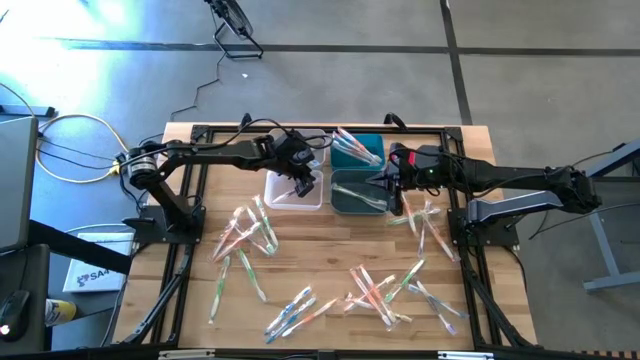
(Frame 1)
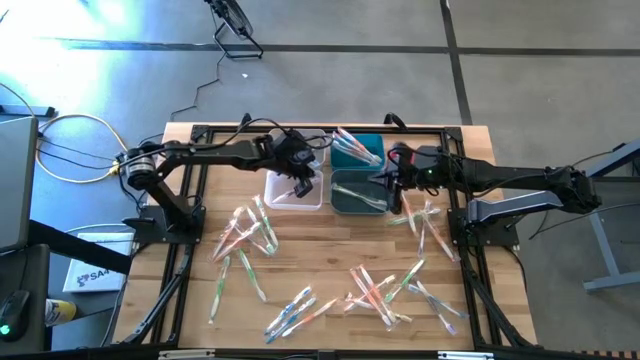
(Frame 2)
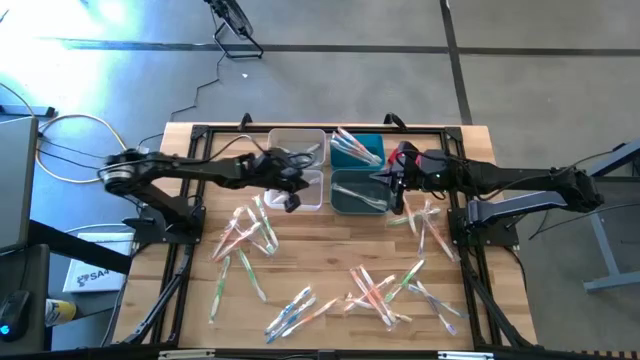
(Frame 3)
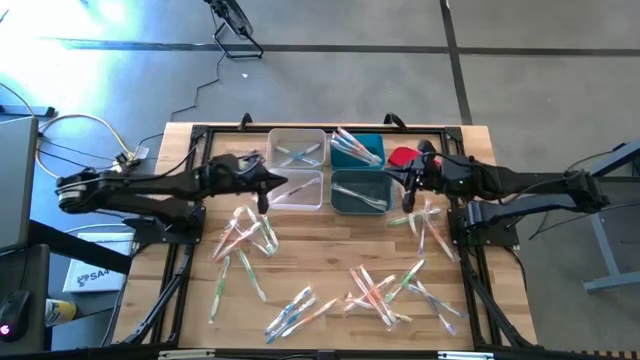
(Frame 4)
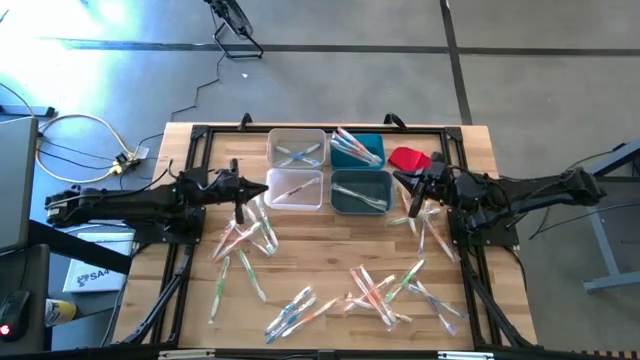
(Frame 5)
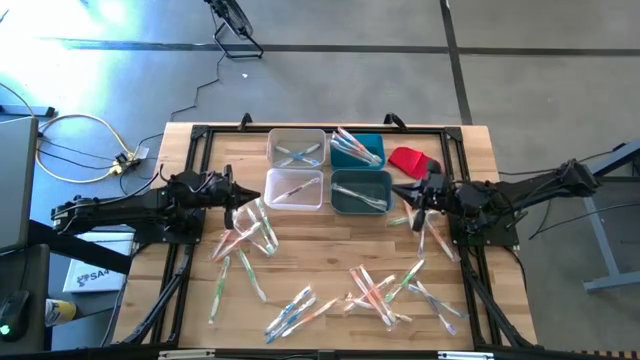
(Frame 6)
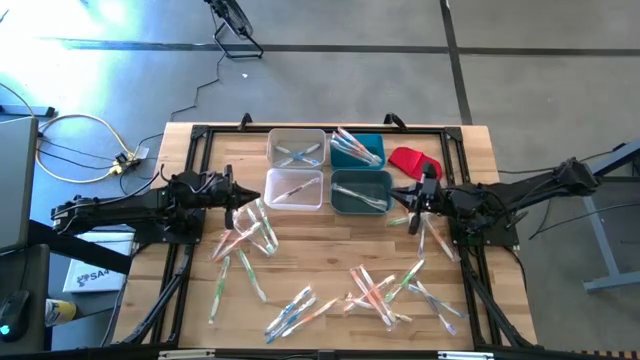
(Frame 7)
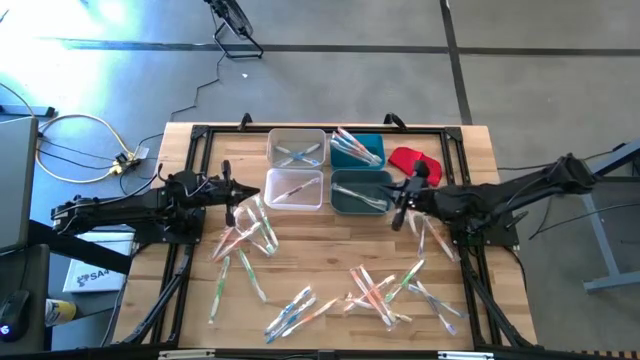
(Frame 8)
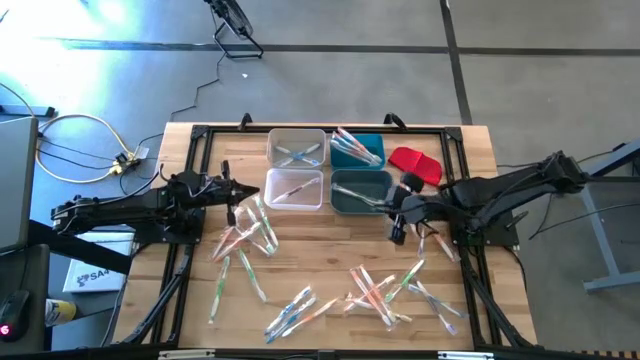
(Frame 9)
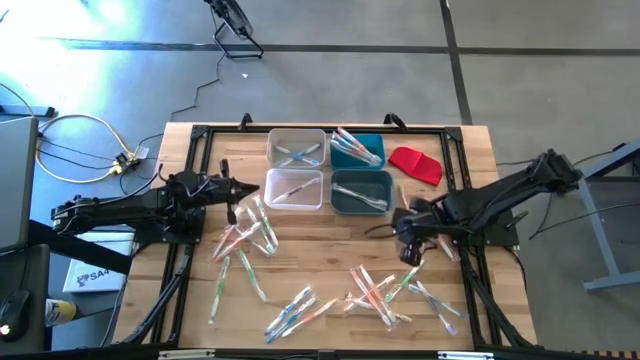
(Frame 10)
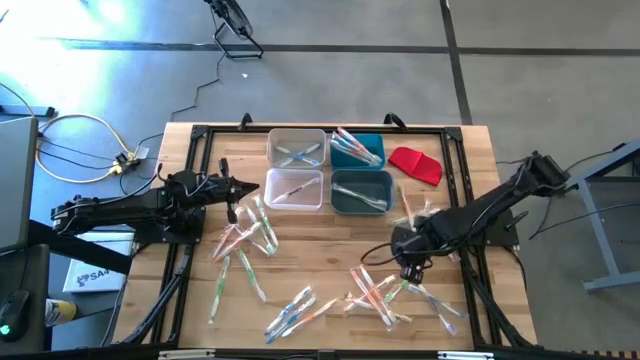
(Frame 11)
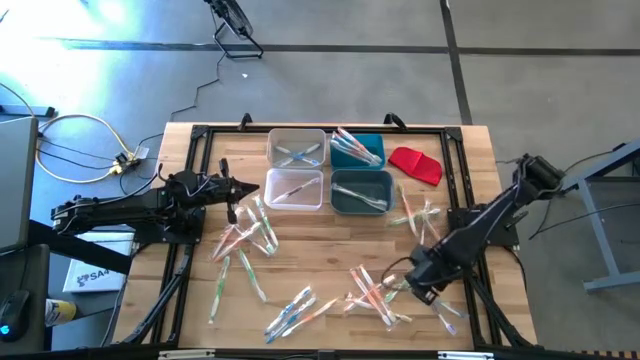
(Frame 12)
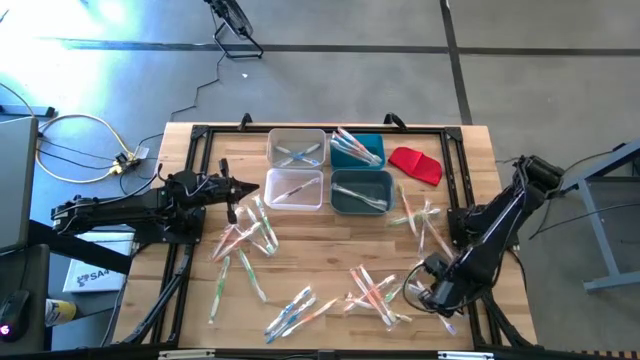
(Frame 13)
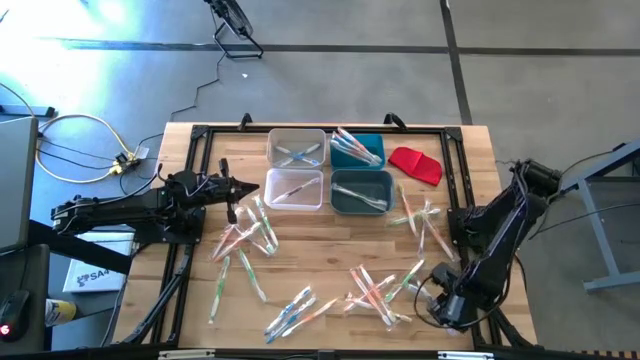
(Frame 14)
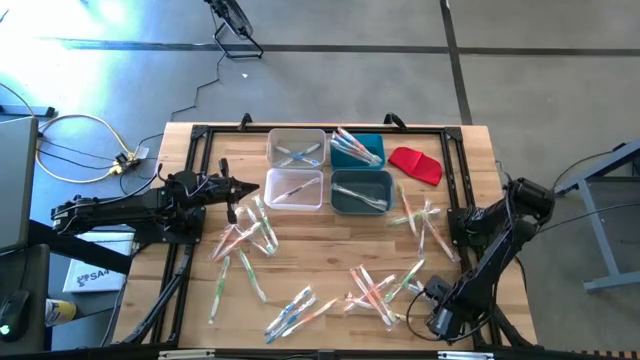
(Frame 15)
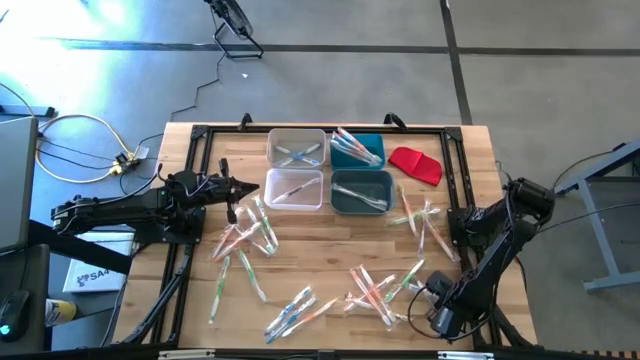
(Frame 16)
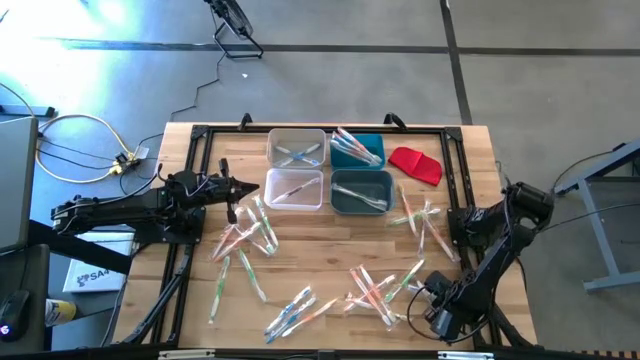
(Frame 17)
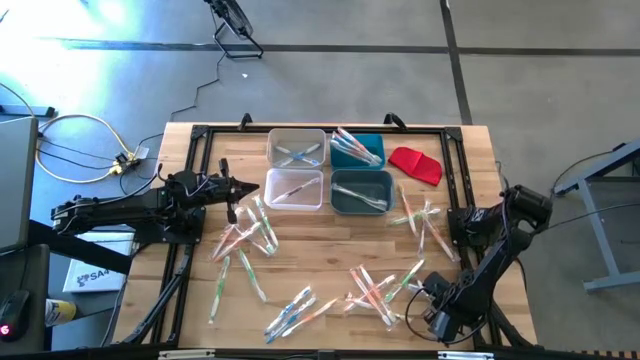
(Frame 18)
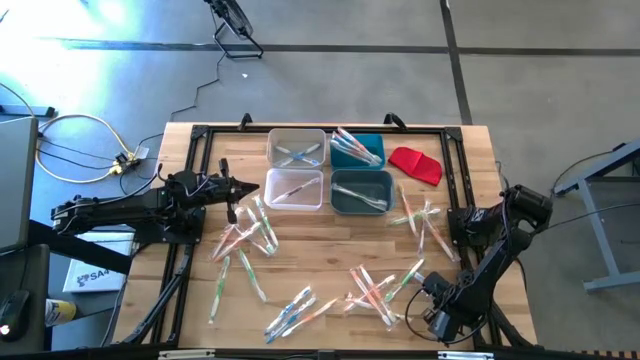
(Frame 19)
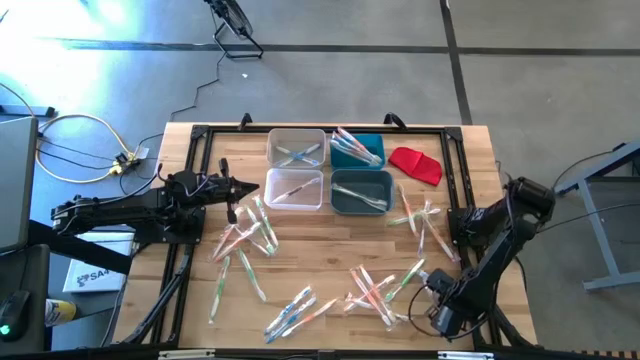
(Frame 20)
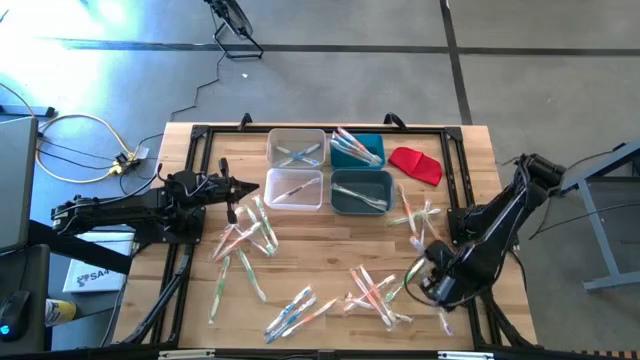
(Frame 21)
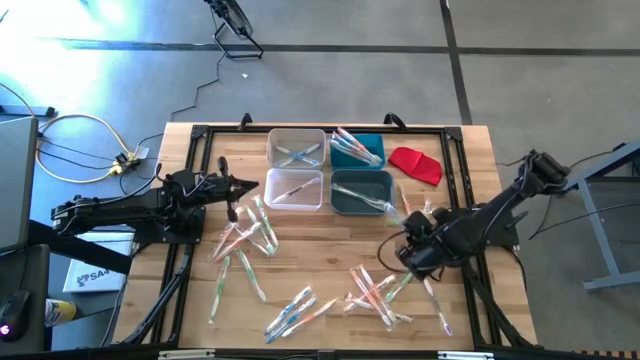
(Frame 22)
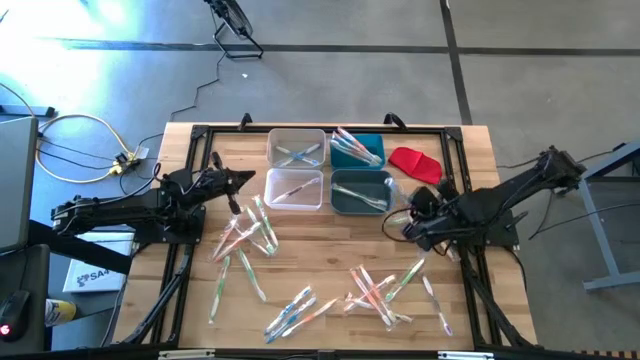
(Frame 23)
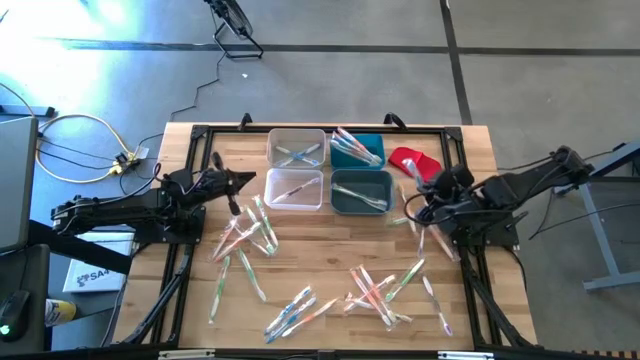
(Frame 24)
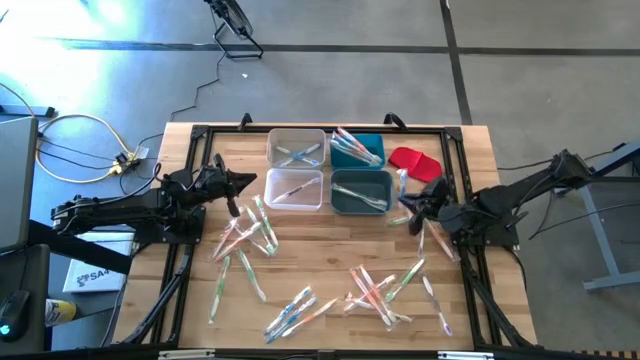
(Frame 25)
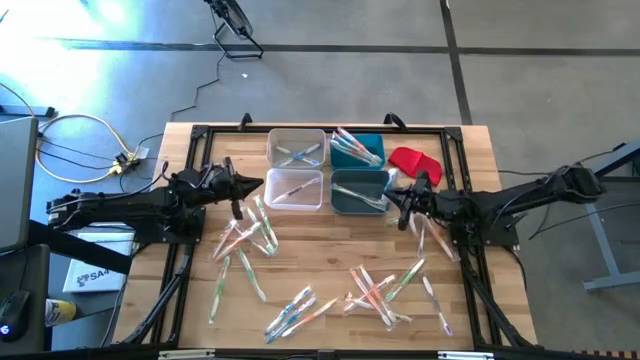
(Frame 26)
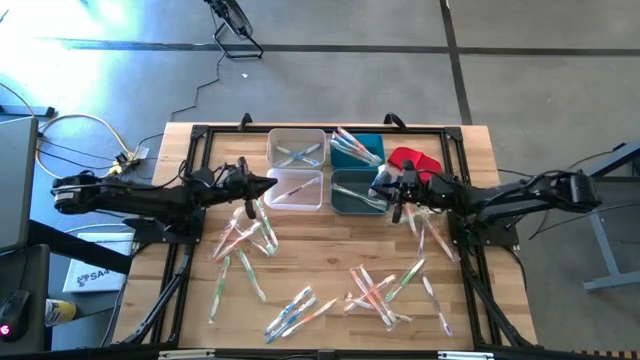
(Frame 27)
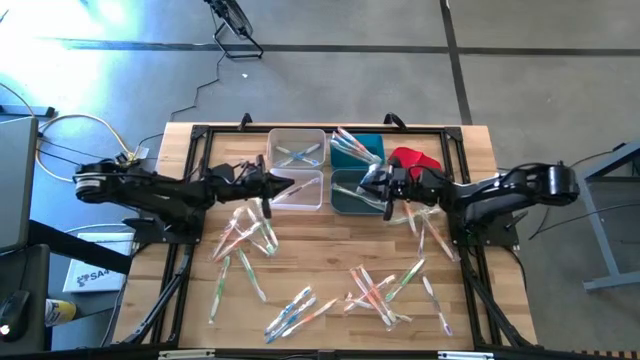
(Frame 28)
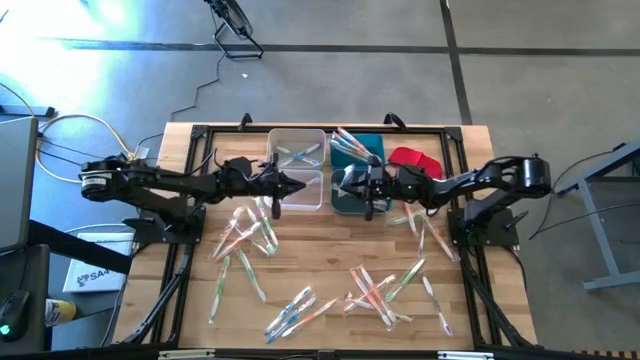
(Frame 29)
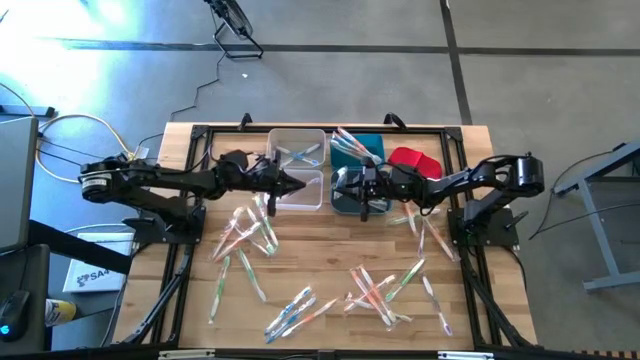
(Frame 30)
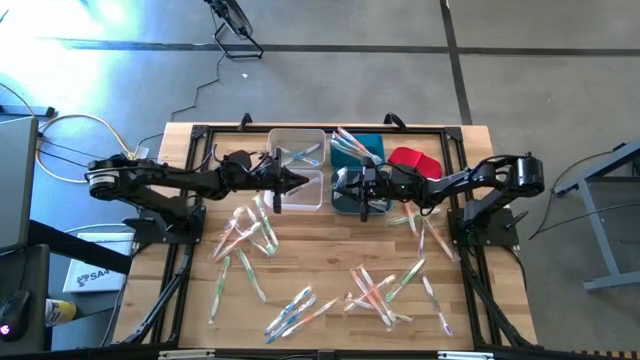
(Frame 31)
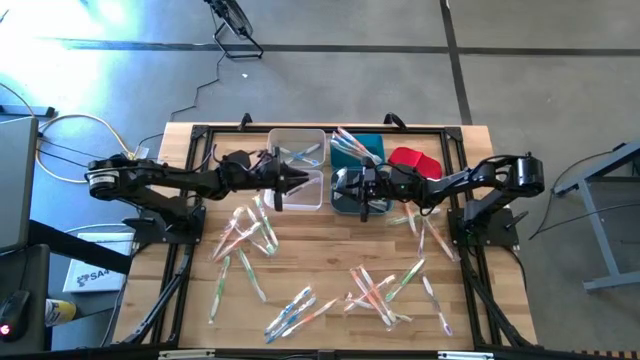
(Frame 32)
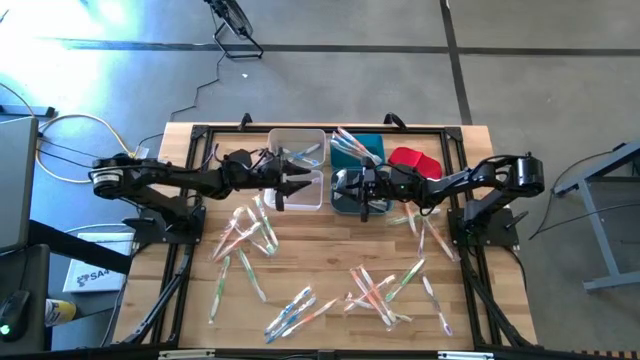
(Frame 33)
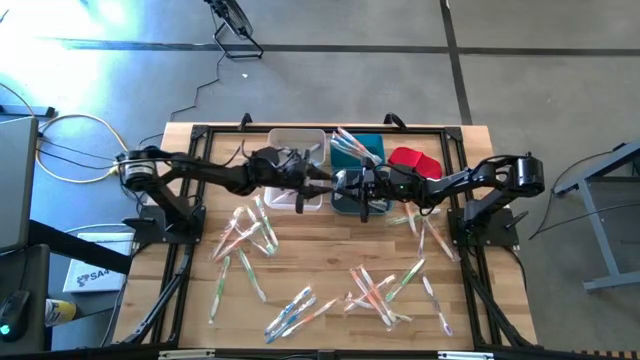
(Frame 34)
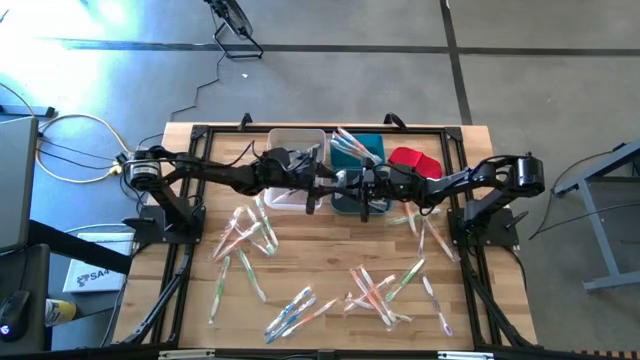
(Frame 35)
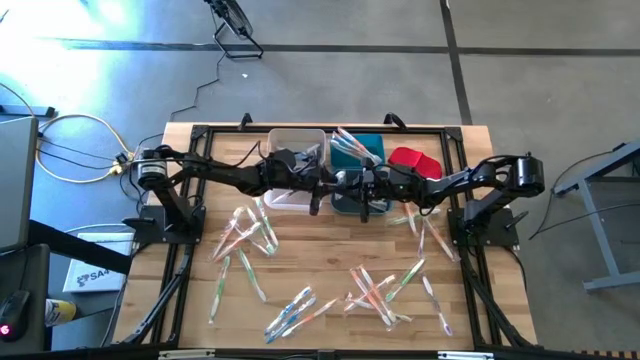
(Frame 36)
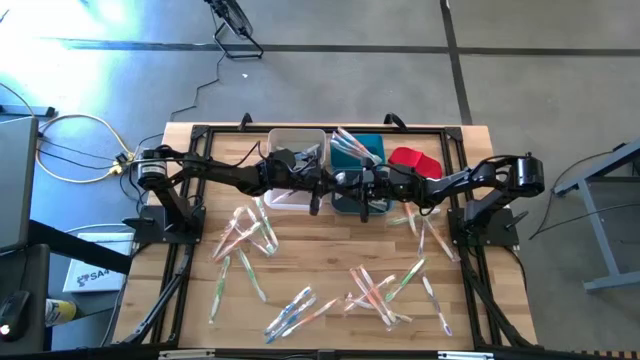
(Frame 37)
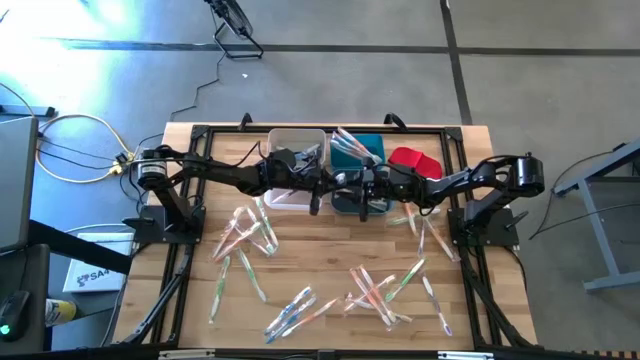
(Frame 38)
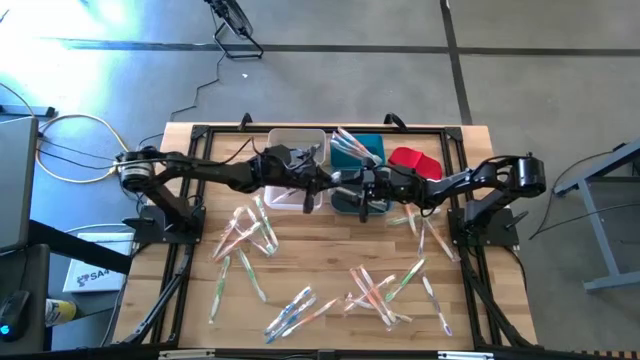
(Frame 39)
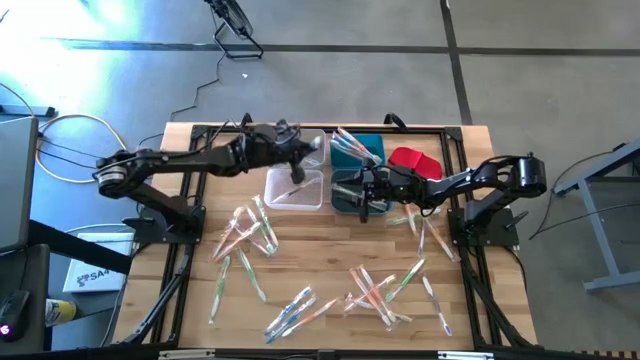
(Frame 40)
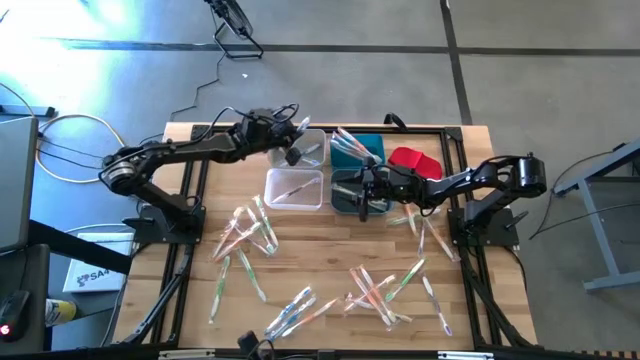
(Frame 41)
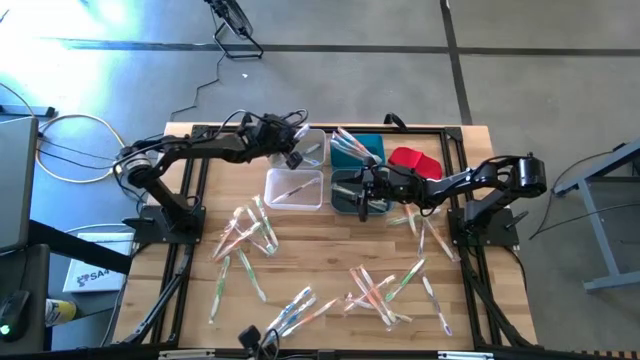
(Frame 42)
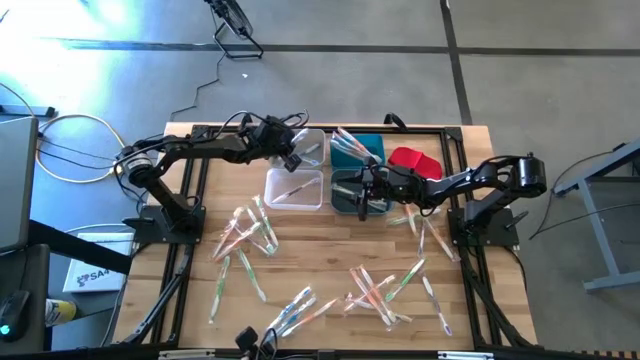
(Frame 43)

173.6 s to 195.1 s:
Task: Pick & Place Toothbrushes
Put the blue toothbrush into the white bin
